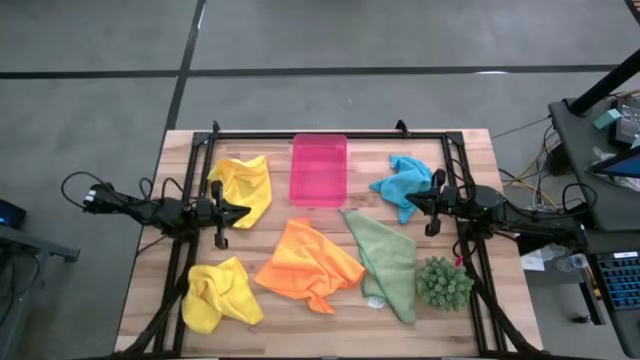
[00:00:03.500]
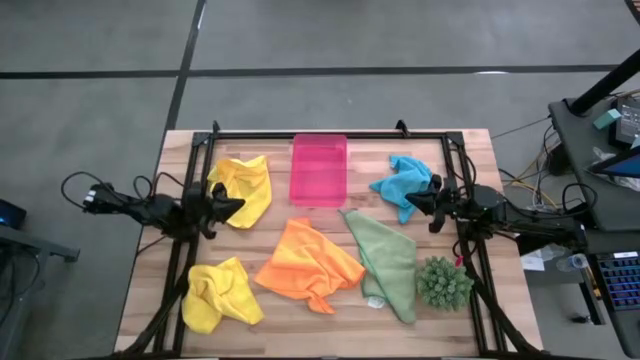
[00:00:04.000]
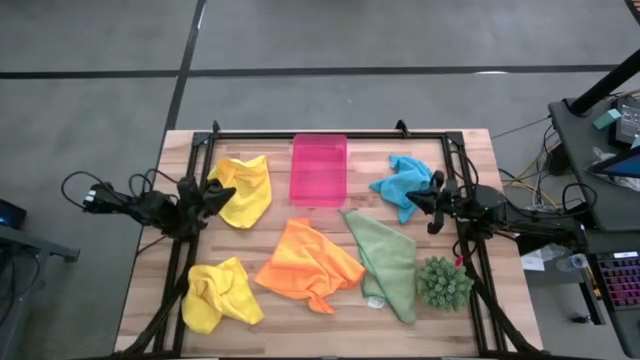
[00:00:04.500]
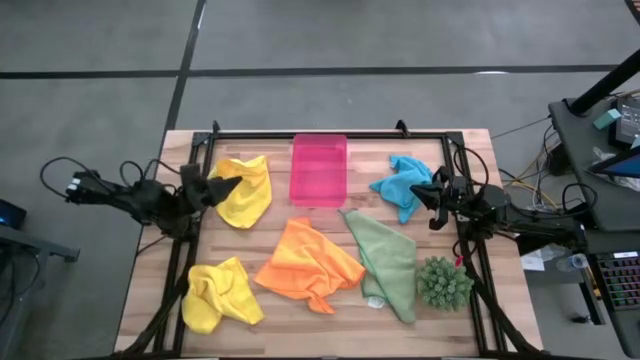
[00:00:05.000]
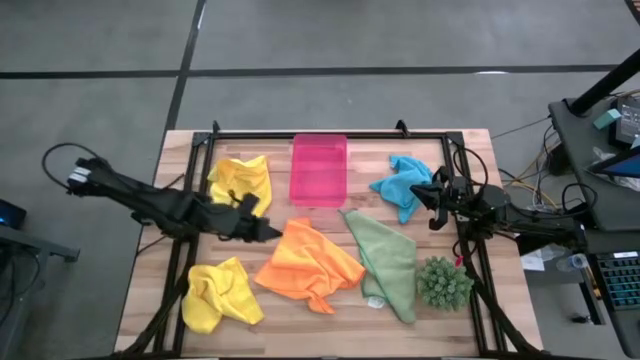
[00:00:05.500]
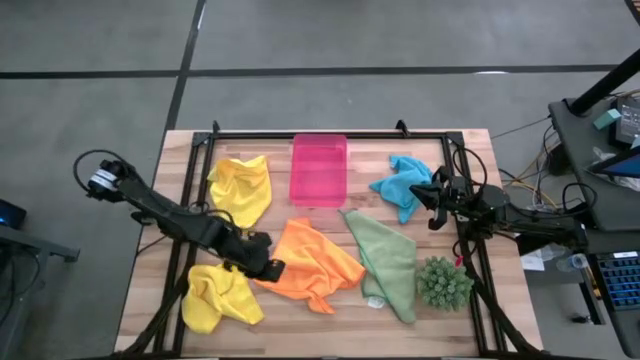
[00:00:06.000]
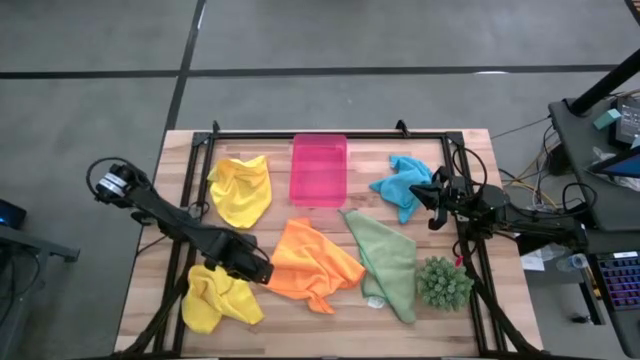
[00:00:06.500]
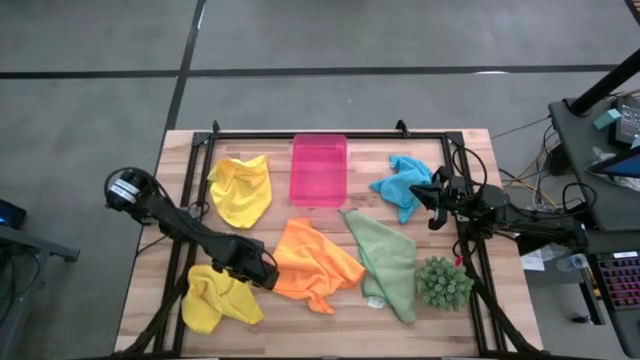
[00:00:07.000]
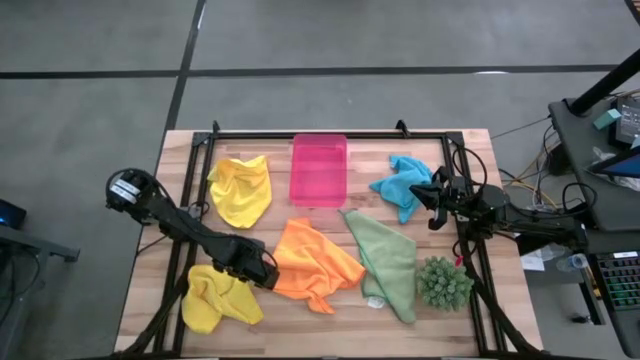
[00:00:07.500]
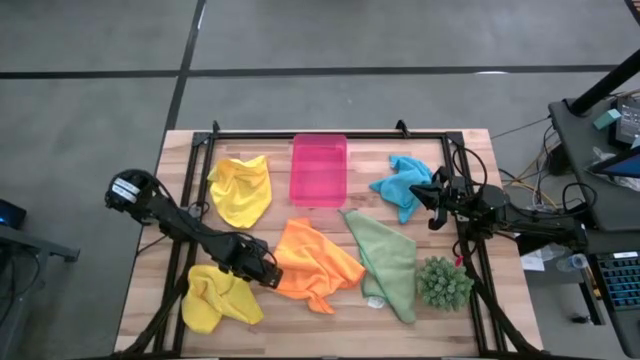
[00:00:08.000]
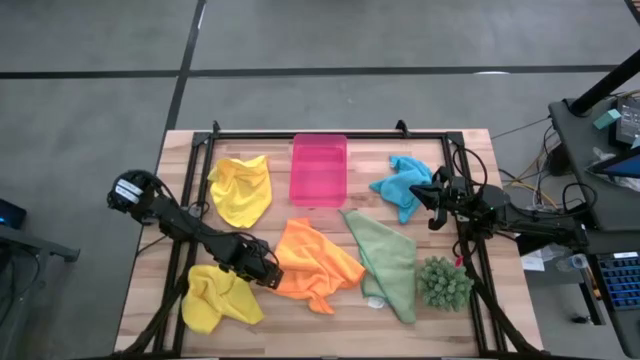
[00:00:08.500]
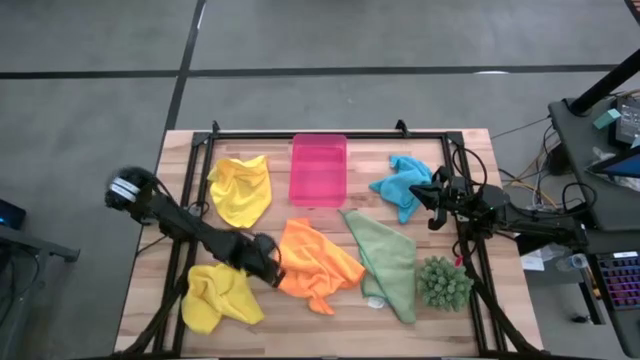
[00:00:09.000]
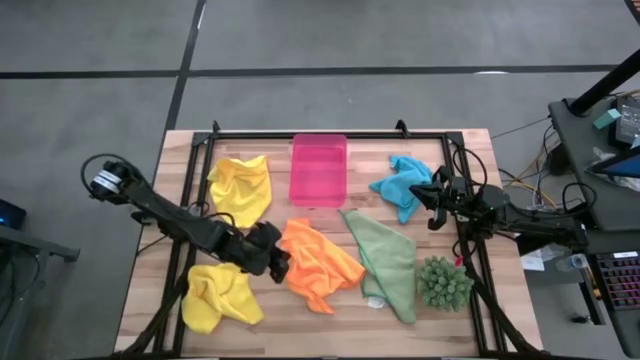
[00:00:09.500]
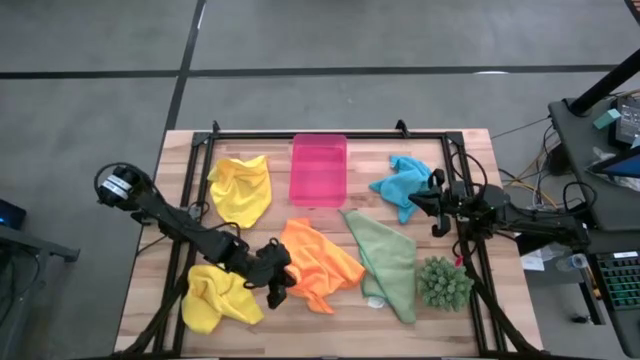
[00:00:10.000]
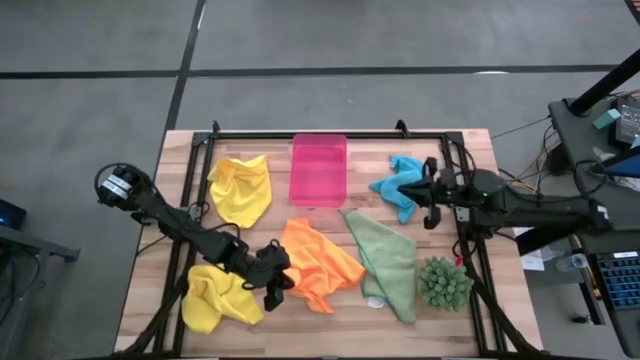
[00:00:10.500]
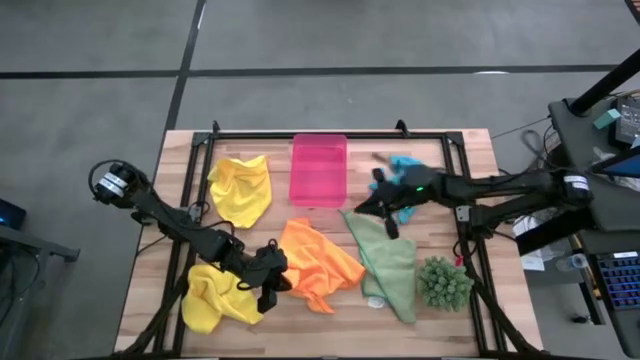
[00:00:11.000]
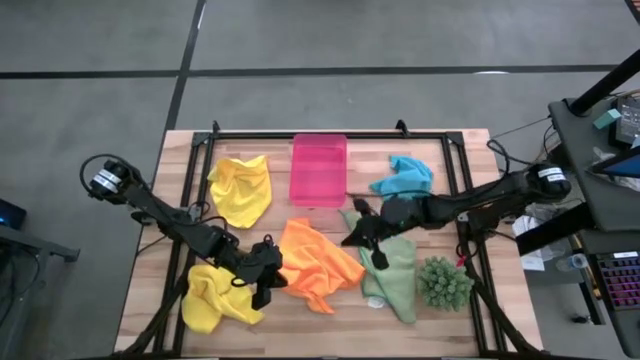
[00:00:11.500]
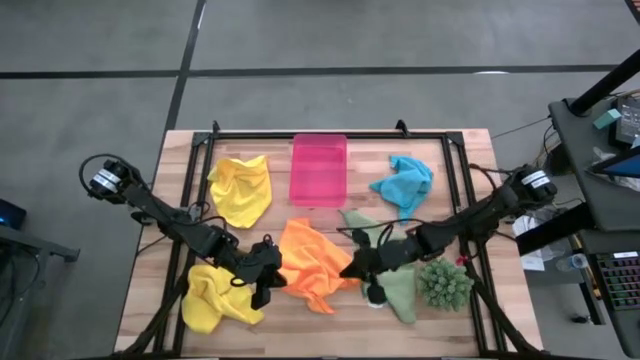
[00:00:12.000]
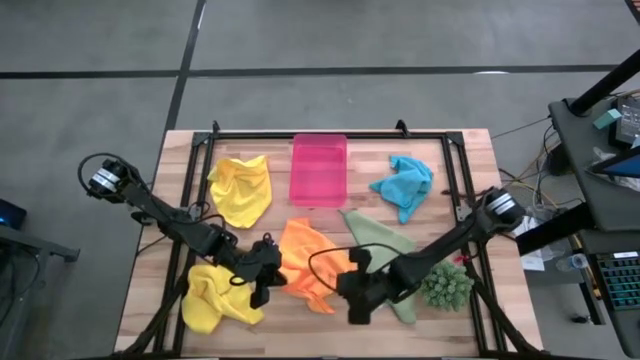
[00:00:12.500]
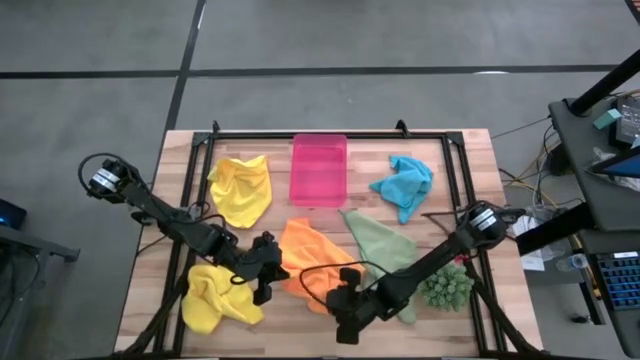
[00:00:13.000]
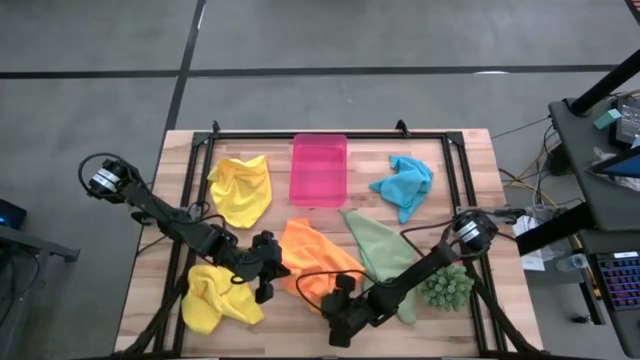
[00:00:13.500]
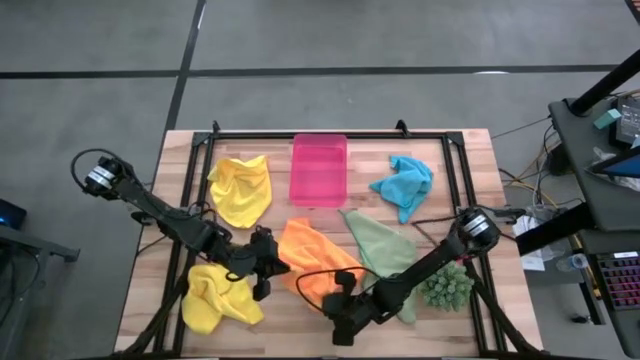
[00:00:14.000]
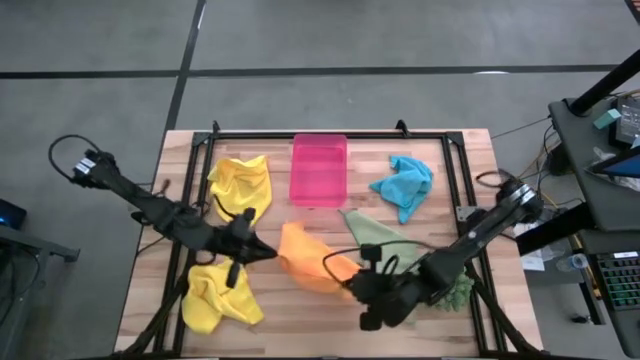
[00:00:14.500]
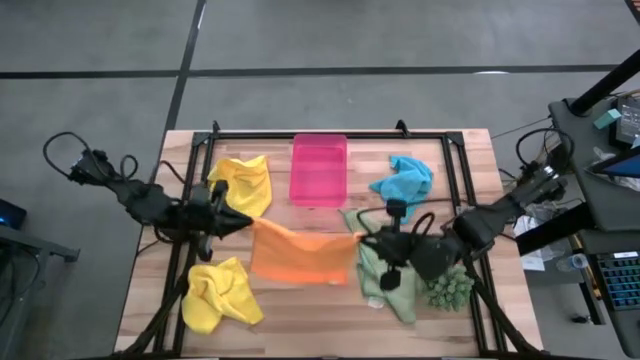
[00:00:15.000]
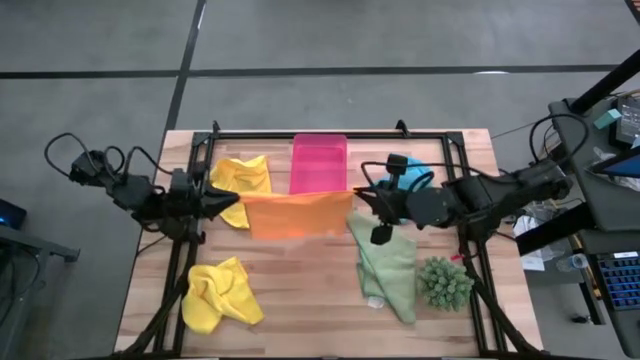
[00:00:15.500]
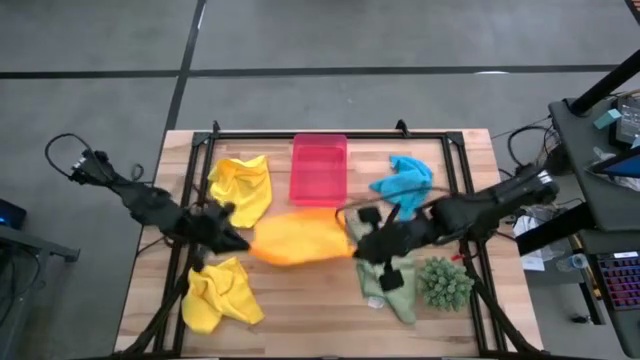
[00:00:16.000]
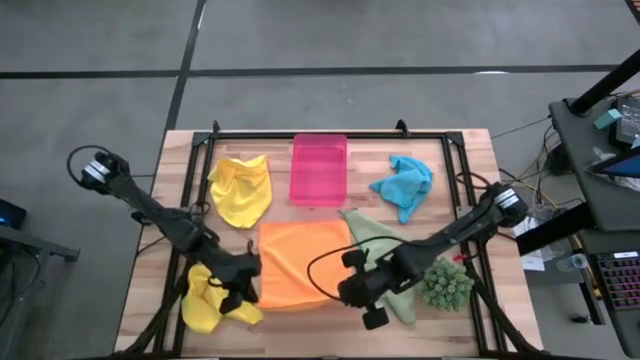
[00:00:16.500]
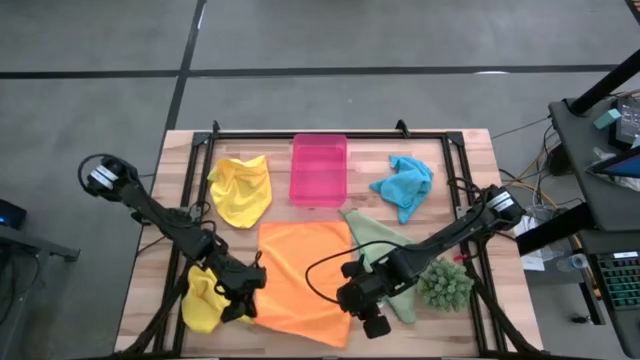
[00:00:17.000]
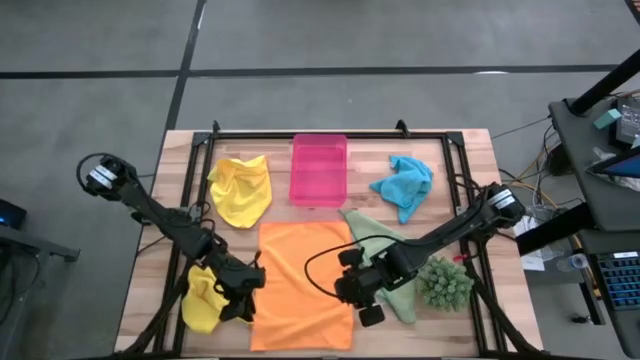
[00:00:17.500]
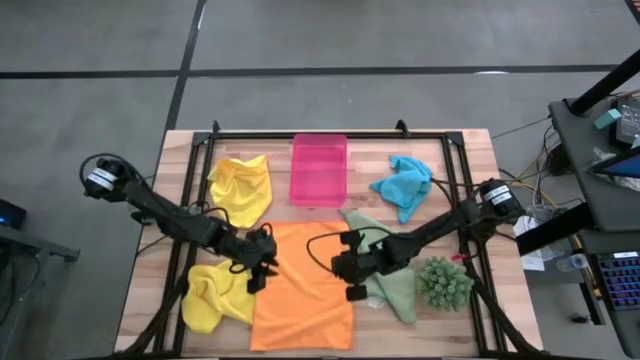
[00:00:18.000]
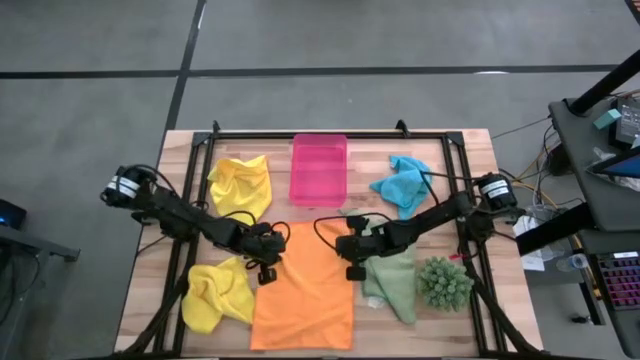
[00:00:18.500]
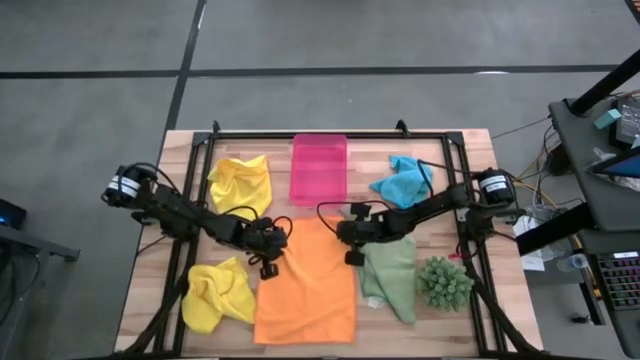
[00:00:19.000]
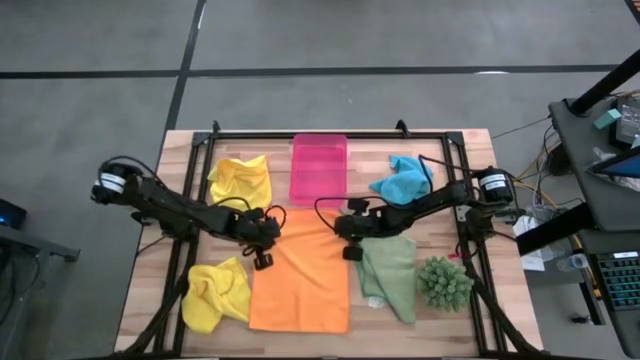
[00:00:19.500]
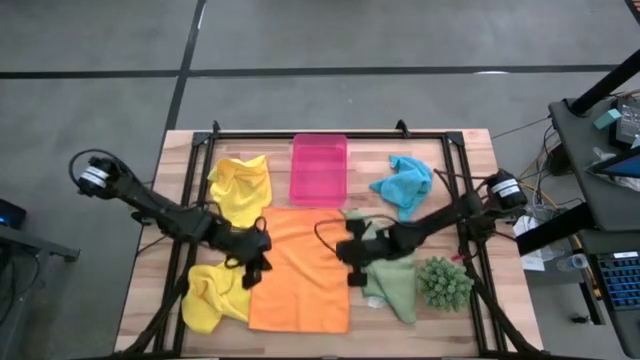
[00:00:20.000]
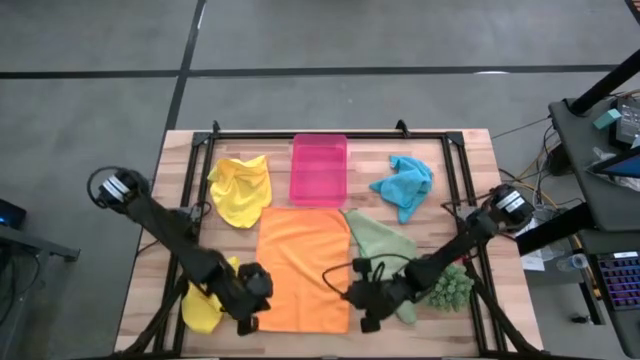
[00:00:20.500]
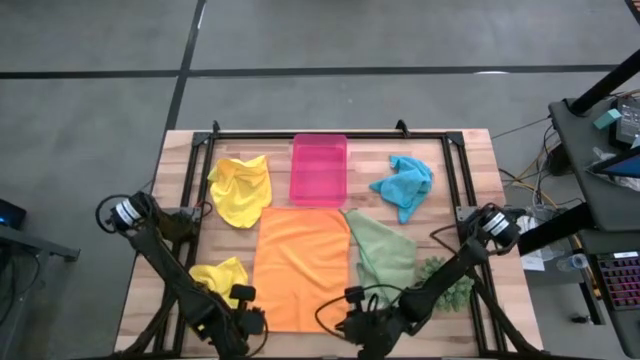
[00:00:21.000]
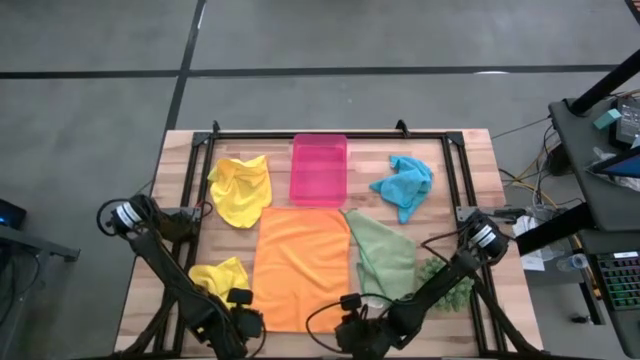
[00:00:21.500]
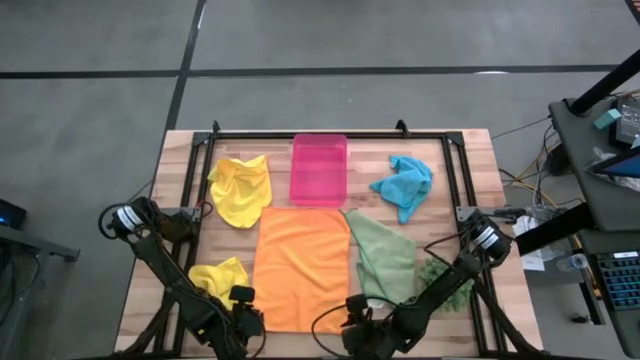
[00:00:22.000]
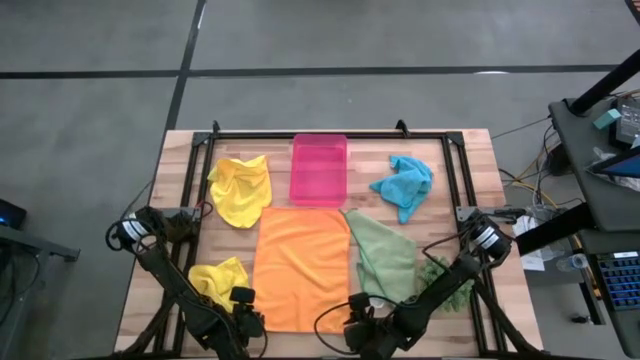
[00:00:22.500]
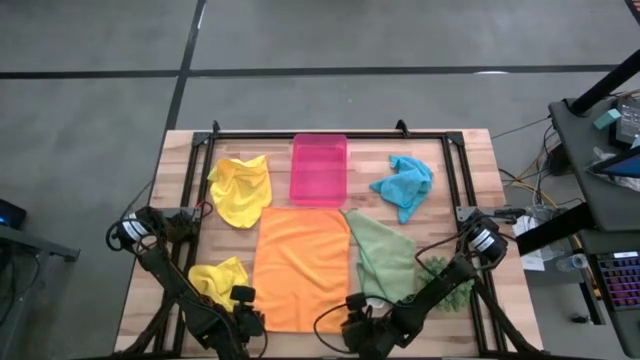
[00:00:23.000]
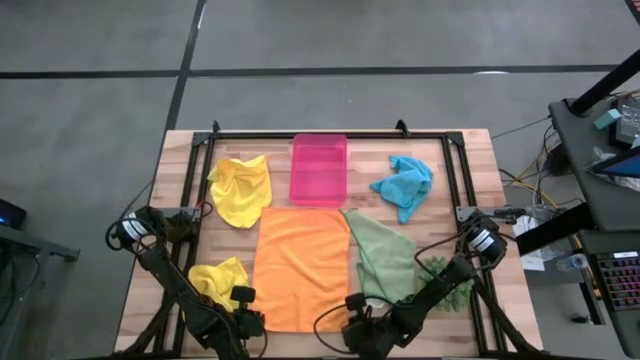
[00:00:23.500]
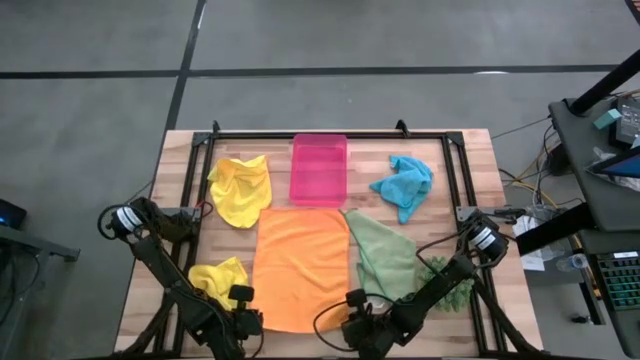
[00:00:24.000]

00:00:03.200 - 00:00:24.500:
Task: Fold microfiber towels
Fold the orange towel
